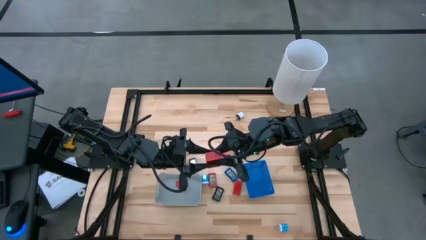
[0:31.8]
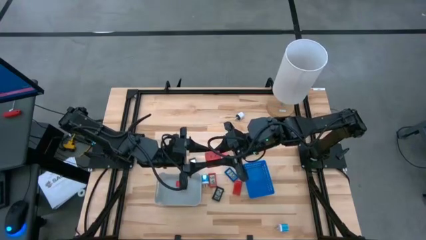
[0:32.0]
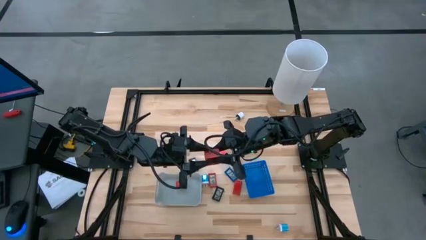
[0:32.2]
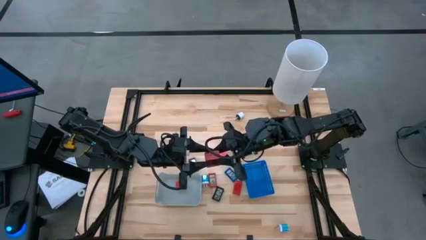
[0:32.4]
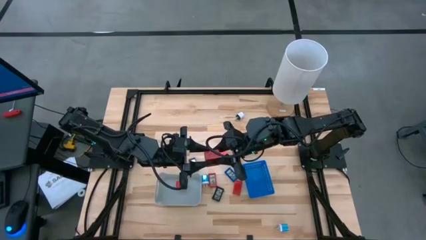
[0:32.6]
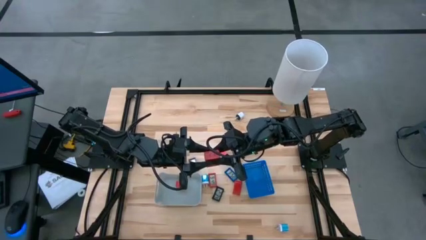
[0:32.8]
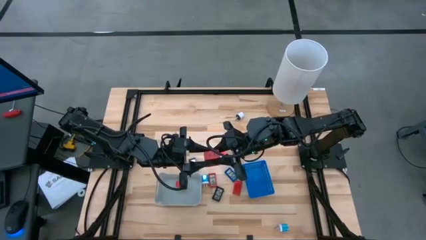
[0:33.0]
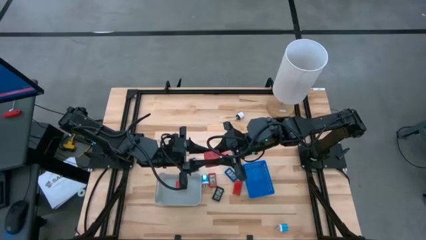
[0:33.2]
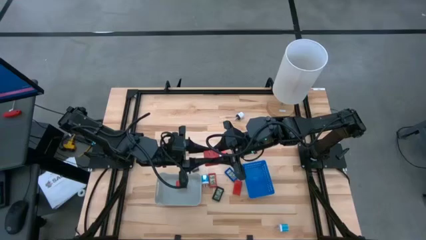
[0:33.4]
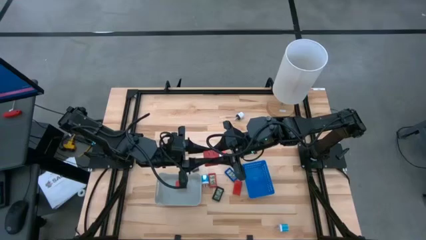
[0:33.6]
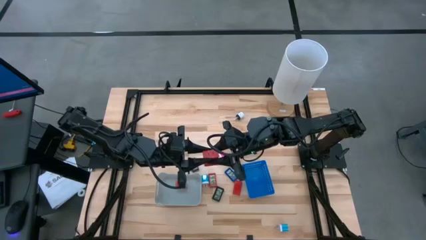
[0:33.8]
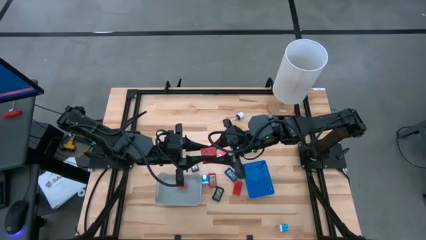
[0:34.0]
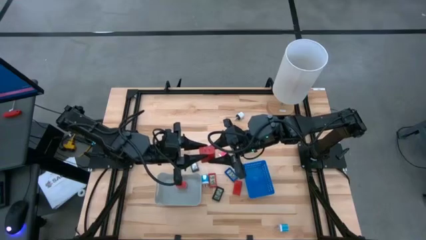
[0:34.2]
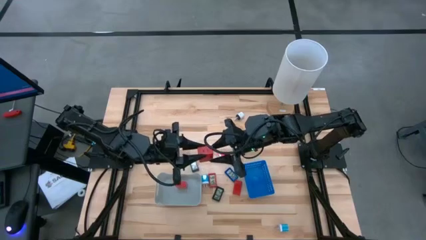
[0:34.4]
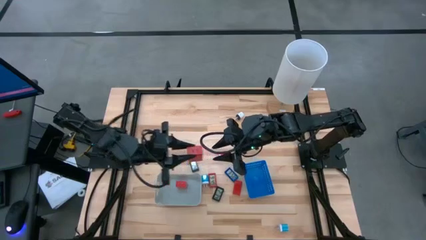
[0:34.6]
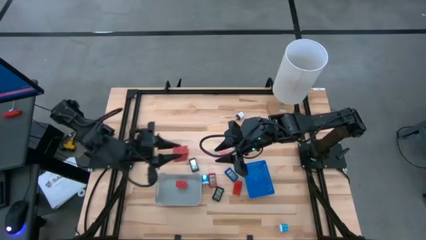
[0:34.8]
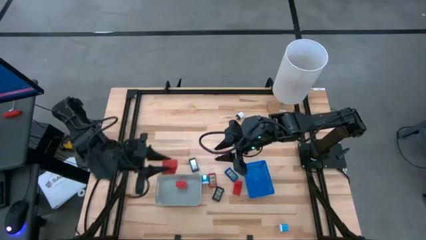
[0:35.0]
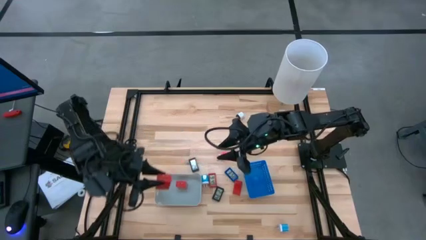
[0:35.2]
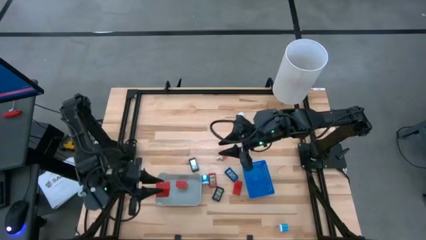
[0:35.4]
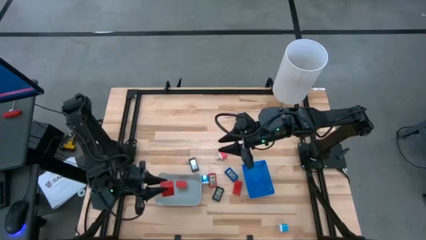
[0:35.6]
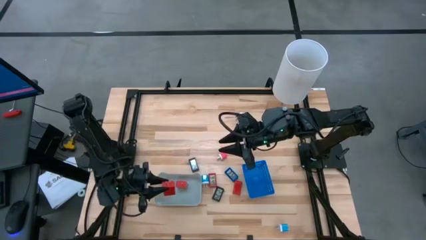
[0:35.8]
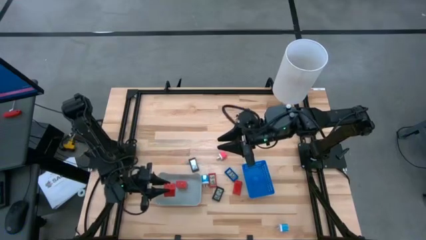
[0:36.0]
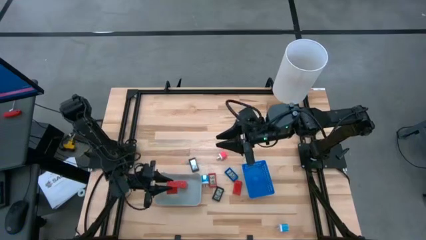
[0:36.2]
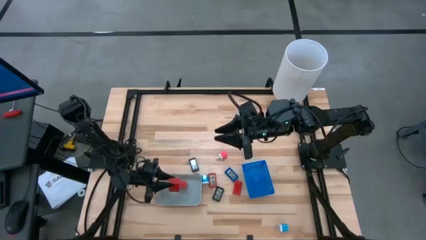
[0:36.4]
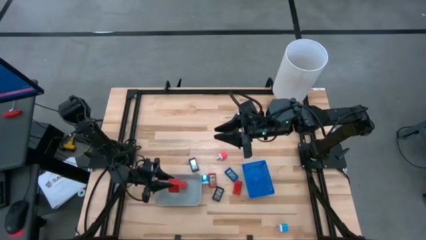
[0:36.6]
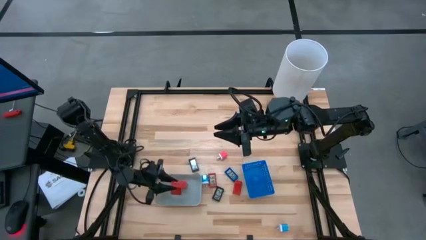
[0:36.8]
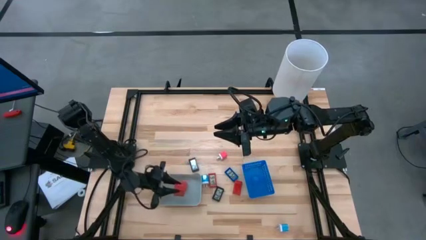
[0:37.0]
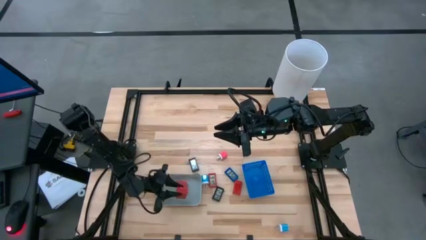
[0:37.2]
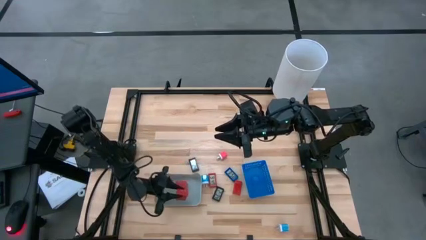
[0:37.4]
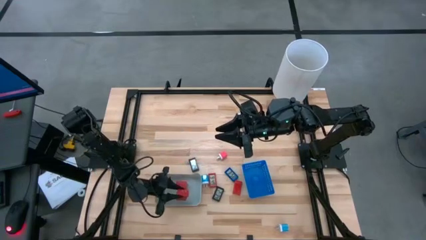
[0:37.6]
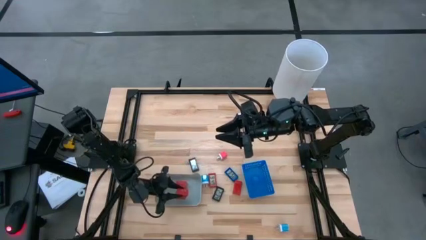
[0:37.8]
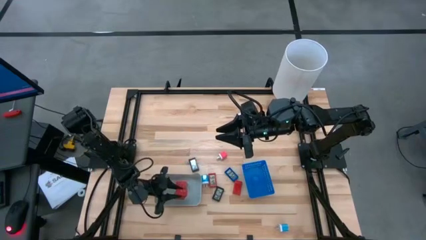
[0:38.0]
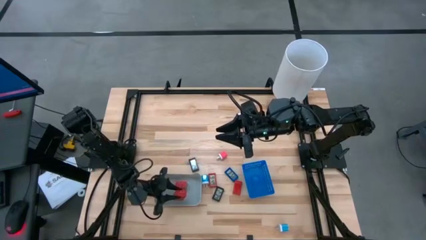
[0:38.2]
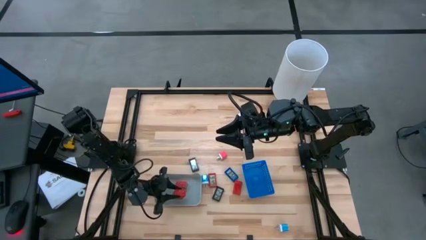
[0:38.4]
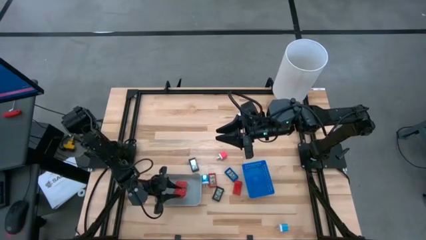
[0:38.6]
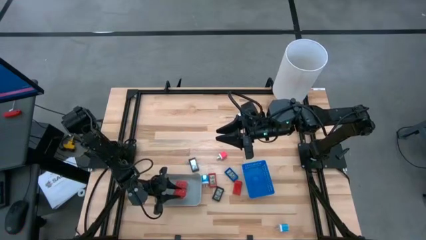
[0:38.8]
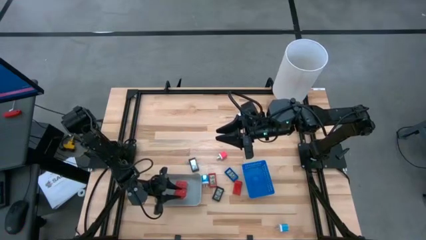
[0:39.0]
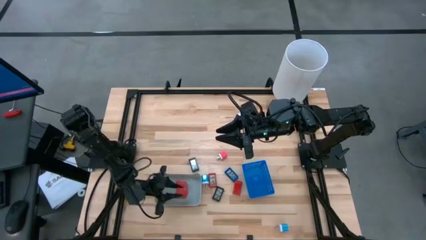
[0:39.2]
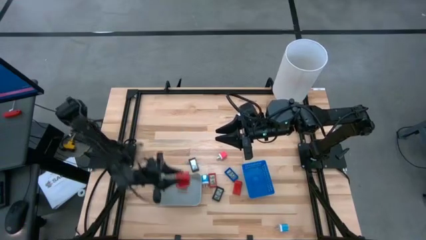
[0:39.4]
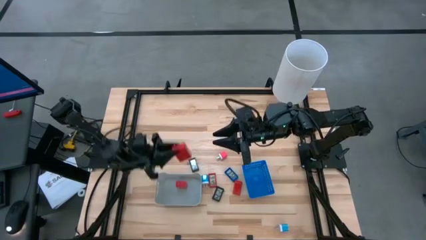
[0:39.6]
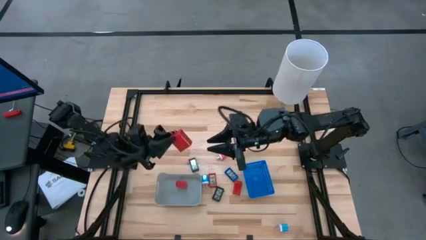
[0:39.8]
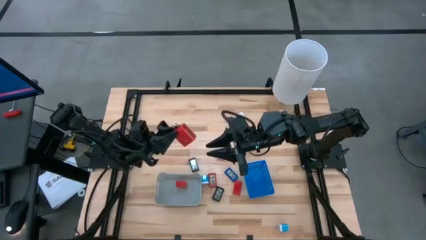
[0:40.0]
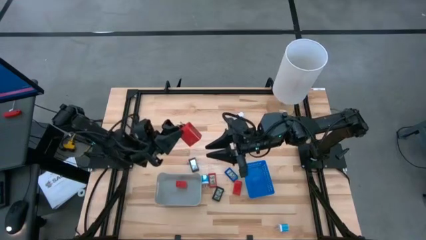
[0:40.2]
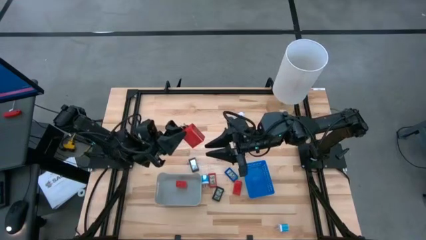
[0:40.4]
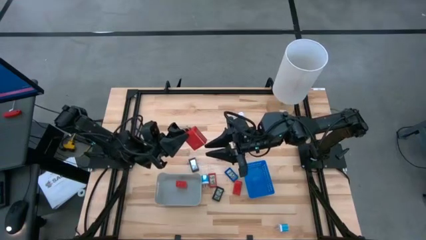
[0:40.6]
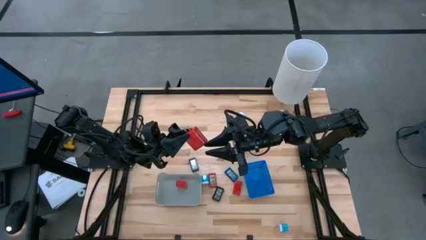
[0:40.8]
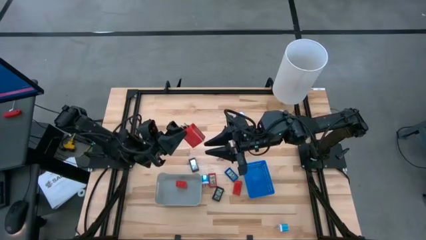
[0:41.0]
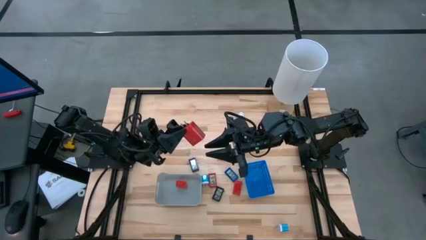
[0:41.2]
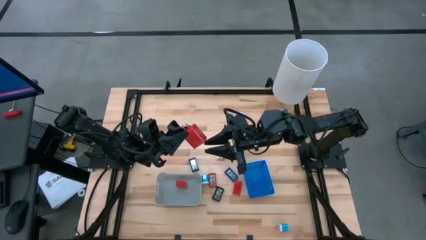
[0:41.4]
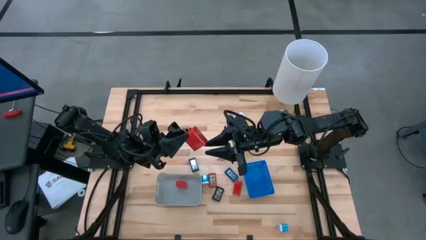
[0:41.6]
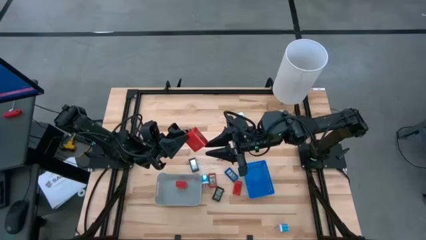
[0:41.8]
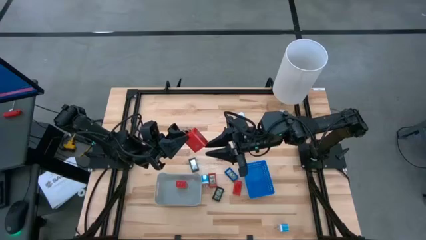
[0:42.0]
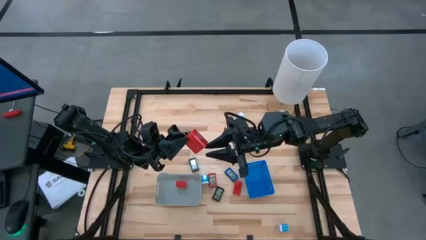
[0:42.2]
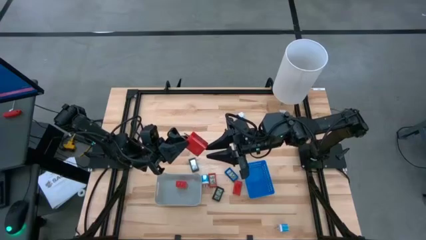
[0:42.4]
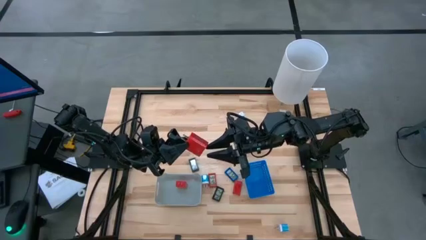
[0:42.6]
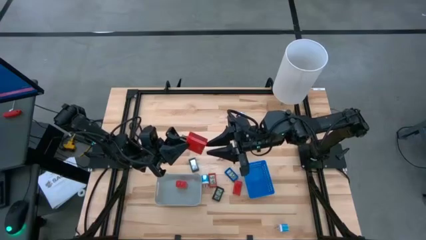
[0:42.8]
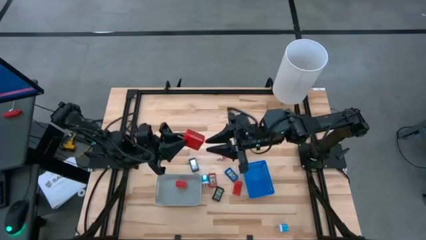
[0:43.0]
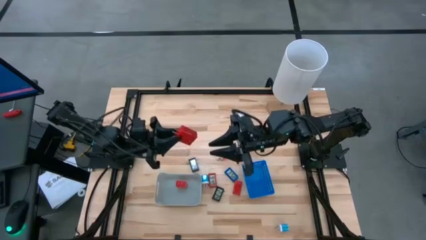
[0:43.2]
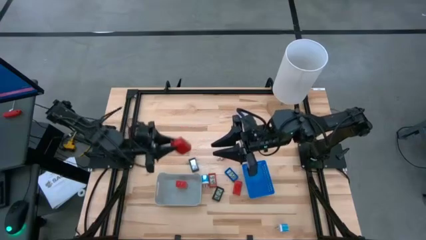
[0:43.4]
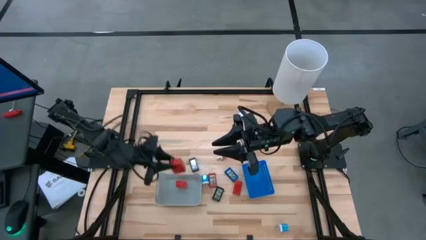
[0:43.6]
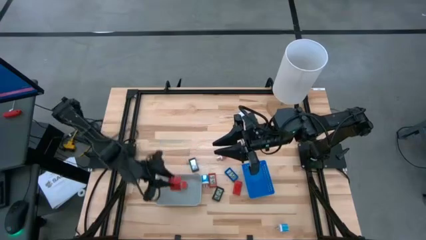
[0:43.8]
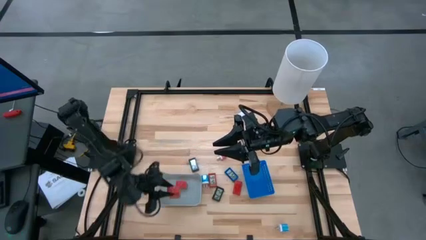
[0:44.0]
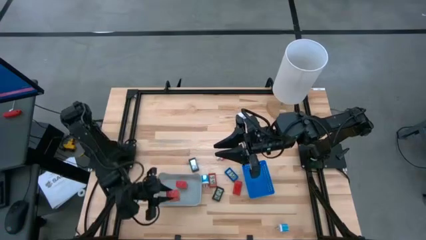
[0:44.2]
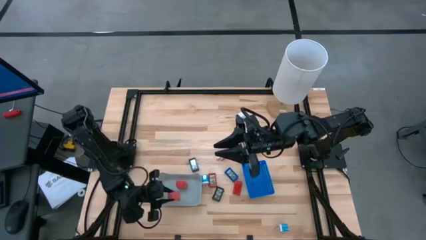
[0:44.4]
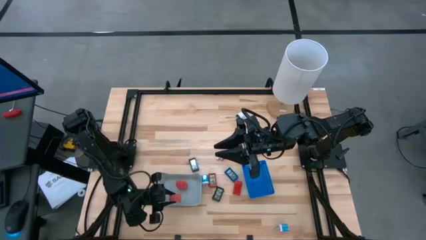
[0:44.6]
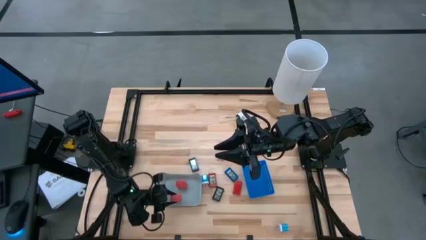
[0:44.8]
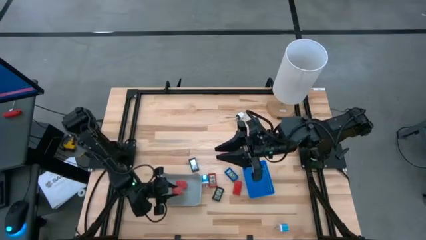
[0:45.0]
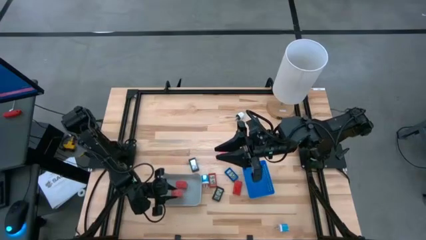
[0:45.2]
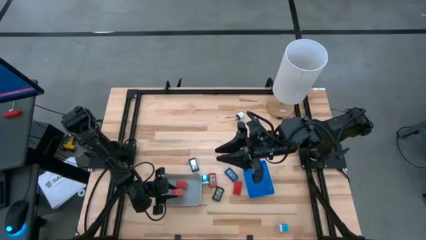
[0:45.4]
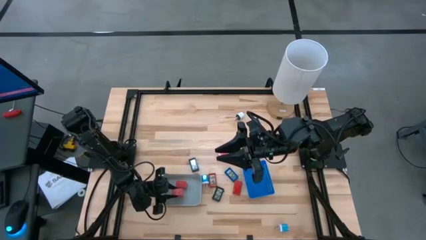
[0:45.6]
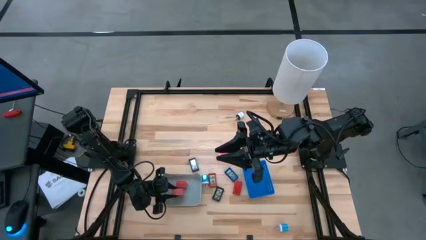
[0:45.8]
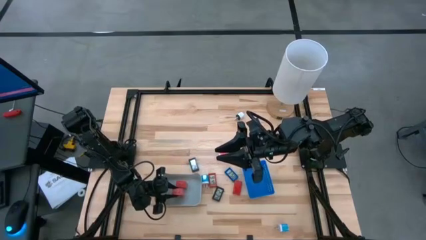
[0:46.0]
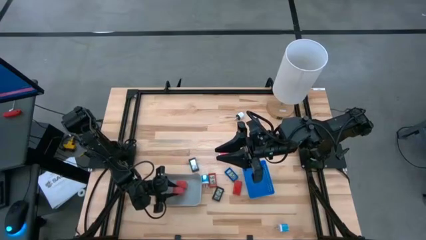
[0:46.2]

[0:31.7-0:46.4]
Task: Pick & Place Office items
Put the red charger adapter into the gray bin

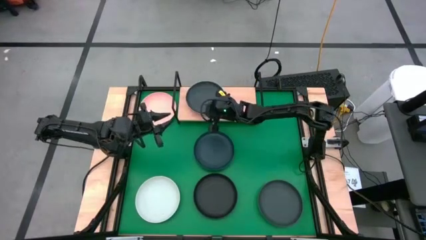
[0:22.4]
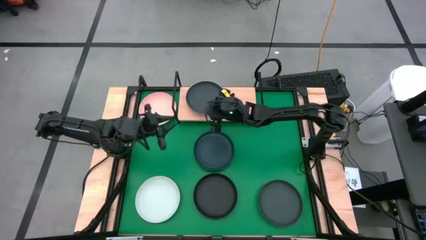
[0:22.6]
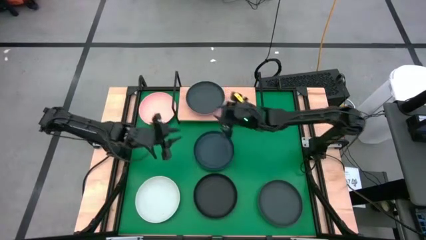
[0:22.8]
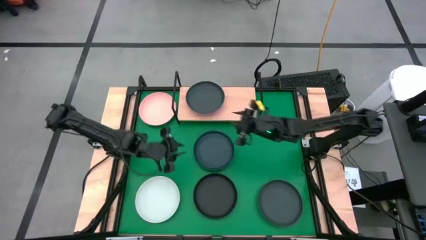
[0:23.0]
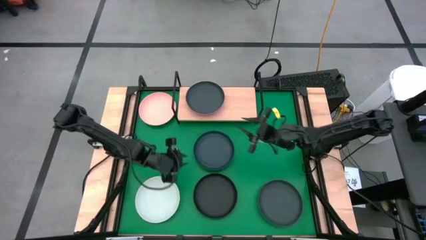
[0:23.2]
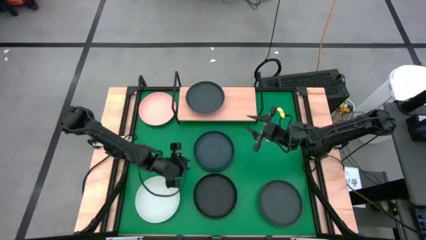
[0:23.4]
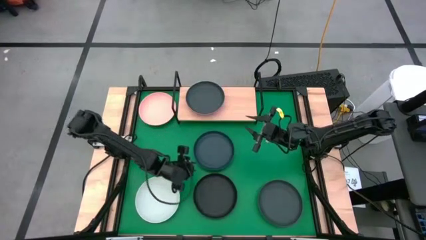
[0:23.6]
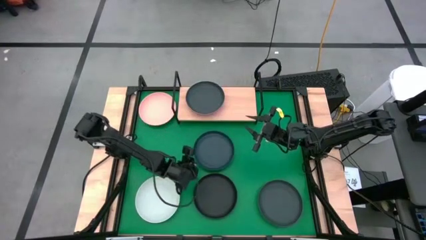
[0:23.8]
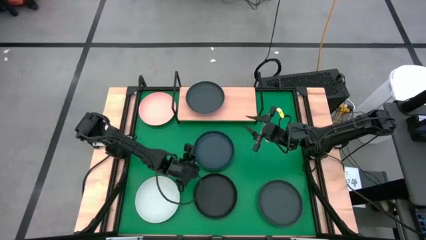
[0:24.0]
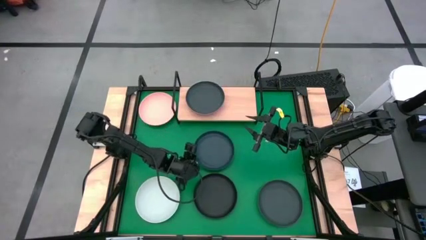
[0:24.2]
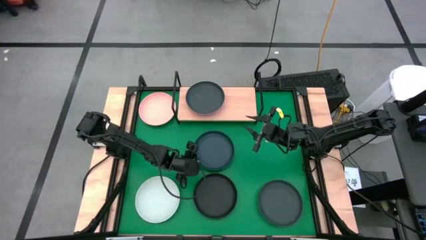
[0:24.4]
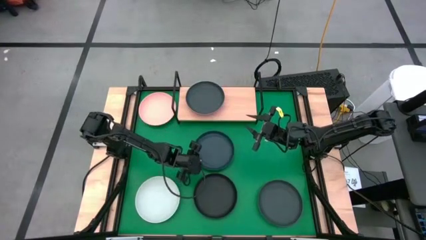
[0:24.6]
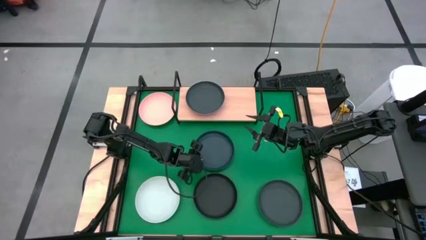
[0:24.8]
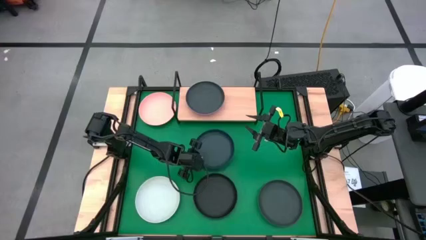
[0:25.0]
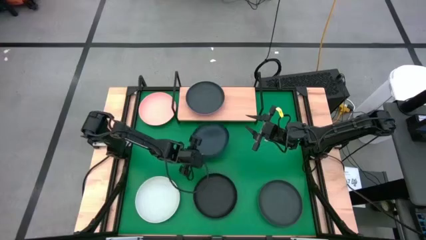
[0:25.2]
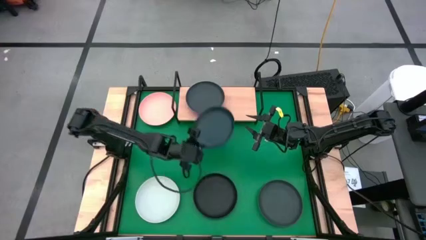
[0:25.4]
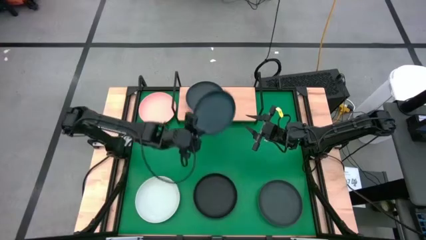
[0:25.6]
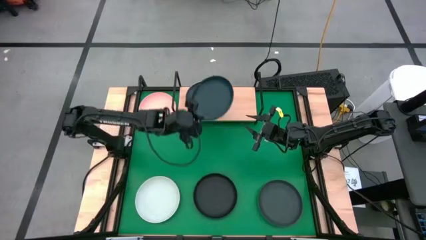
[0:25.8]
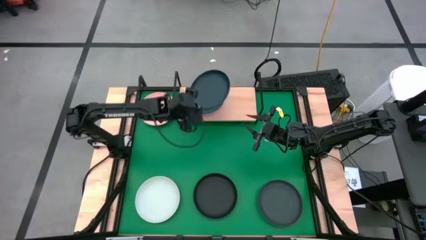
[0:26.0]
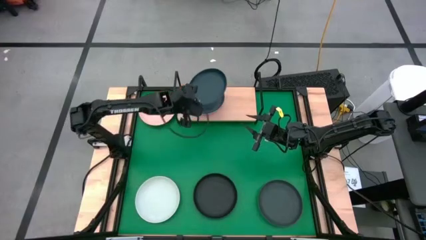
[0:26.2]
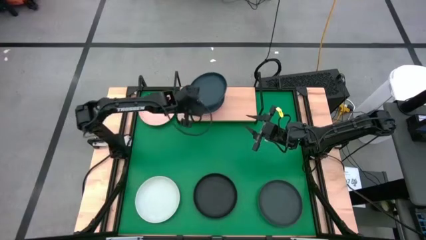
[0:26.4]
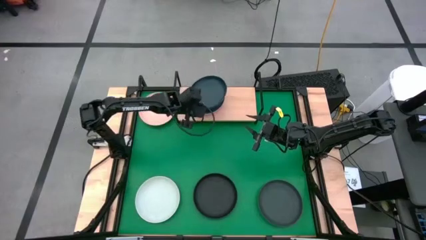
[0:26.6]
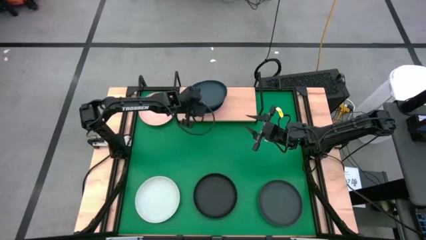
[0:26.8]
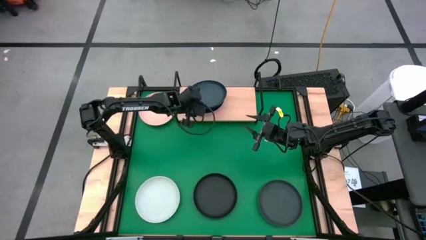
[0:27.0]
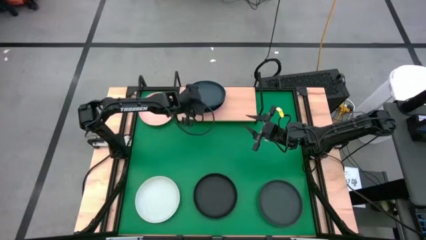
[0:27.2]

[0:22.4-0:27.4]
Task: Place and stack plates onto a shelf
Stack the blue plate on top of the dark green plate on the shelf
